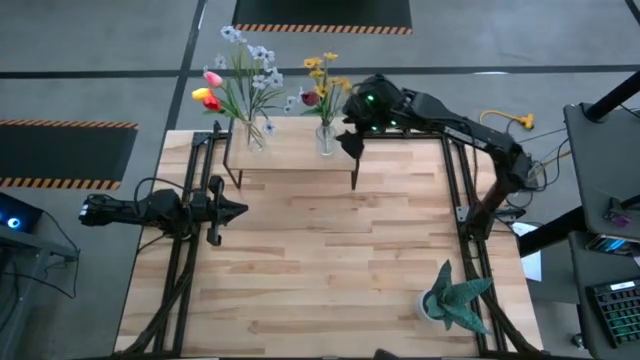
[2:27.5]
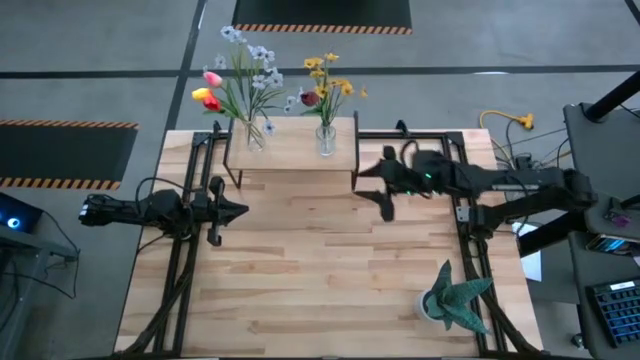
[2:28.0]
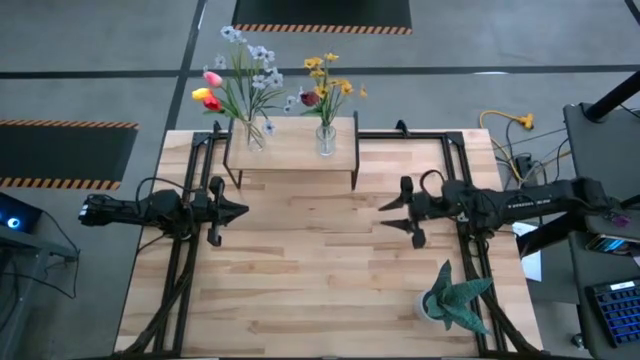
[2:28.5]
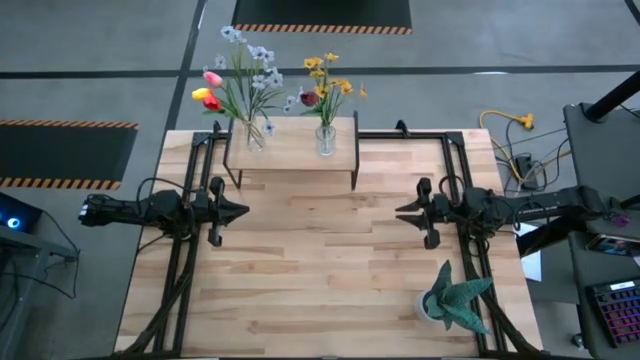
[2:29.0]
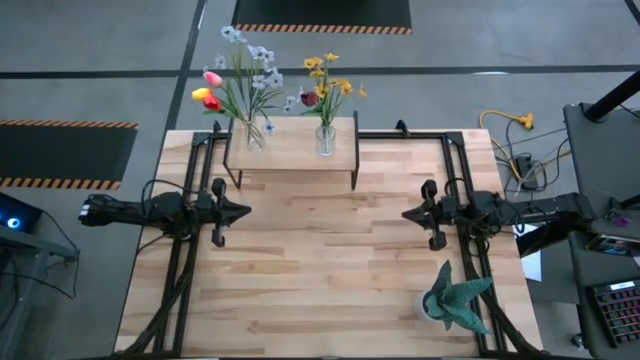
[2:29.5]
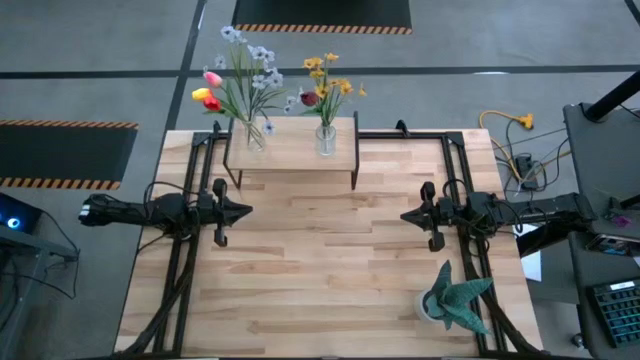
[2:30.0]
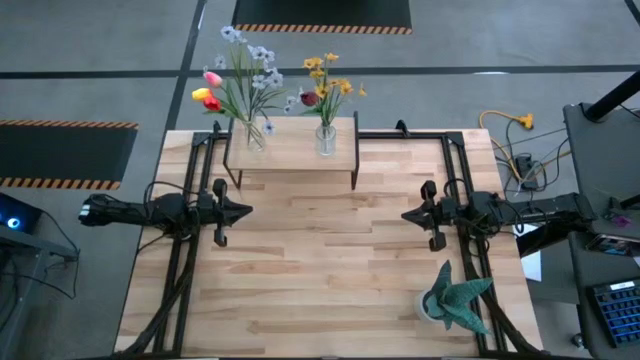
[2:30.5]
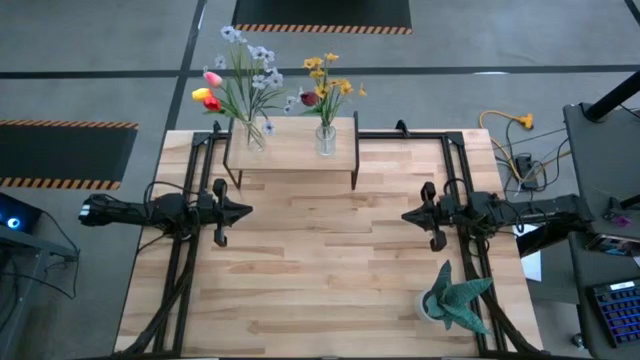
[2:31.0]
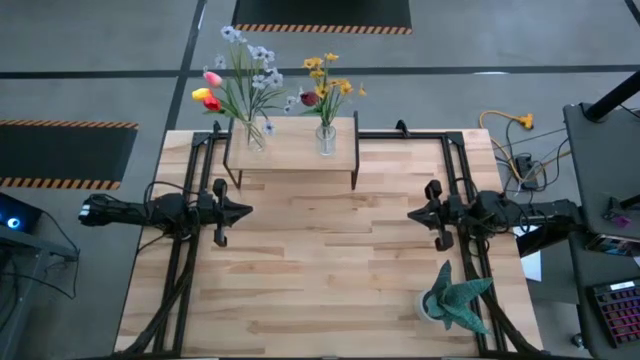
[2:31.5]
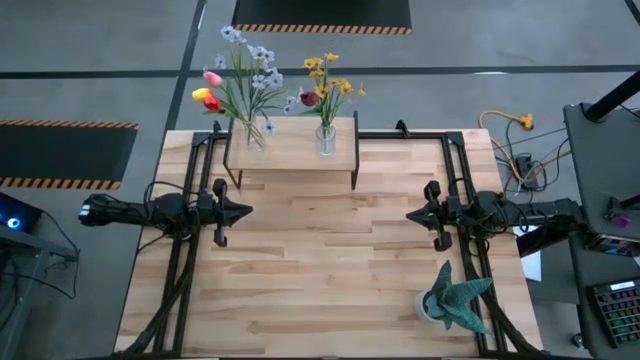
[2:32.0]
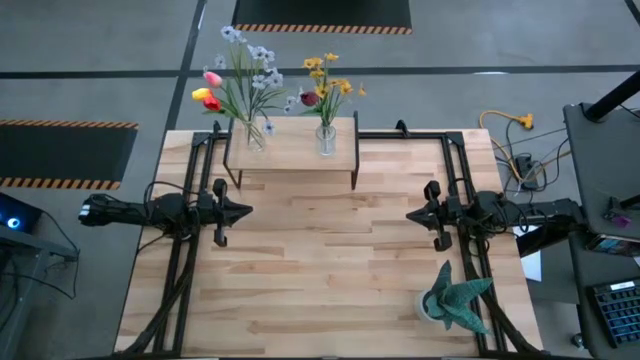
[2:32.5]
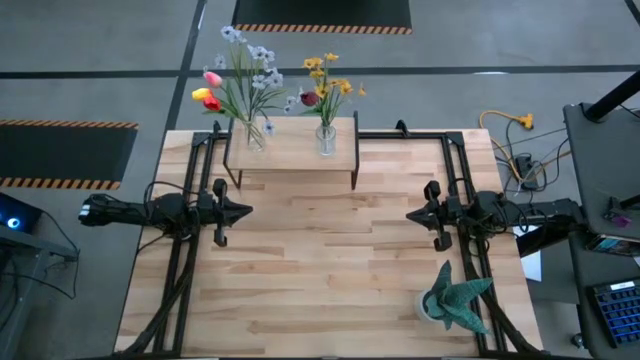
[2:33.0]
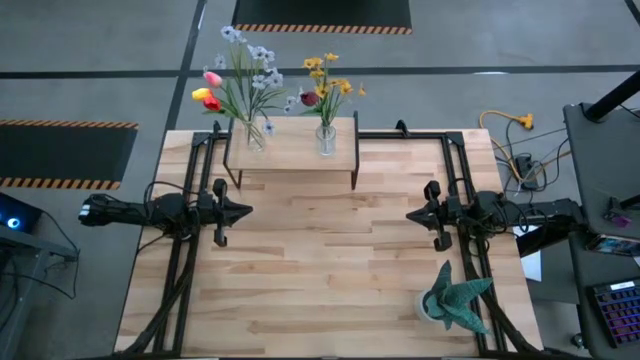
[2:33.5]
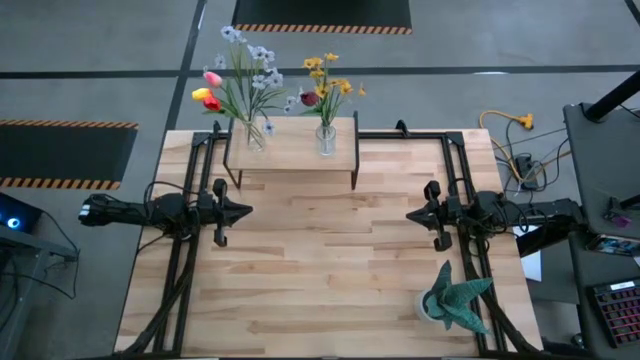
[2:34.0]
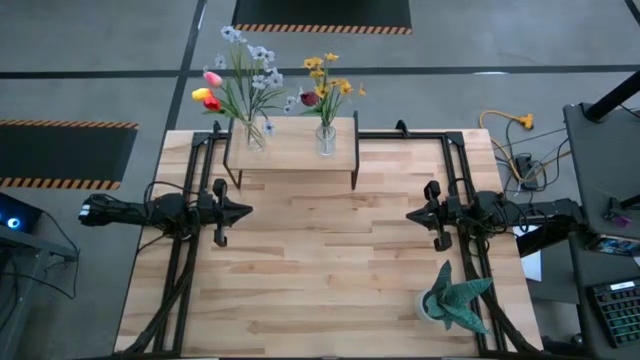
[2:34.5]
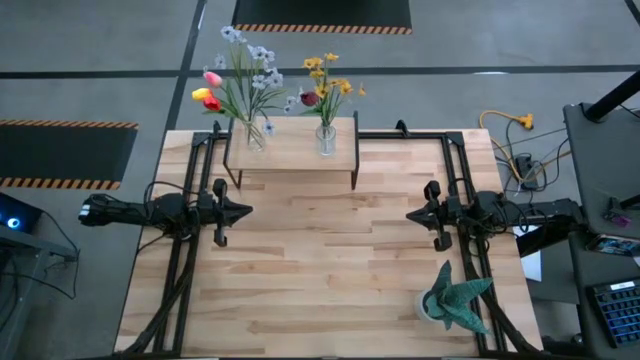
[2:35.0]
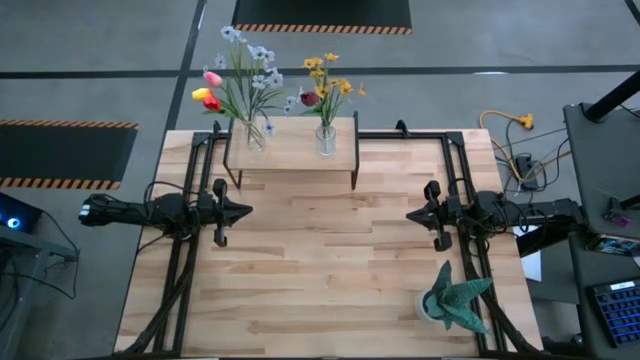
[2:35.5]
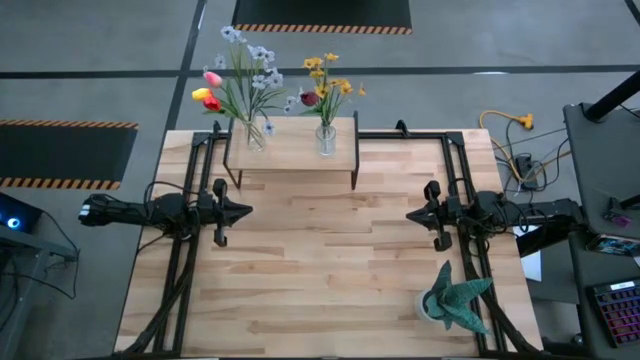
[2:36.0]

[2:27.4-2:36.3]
Task: Pick and place flowers into a vace then onto a shelf
Return to Home Position

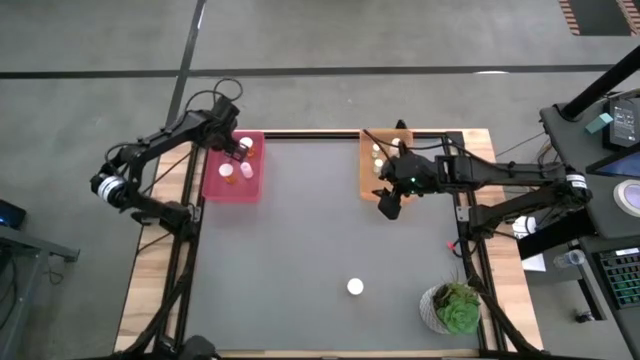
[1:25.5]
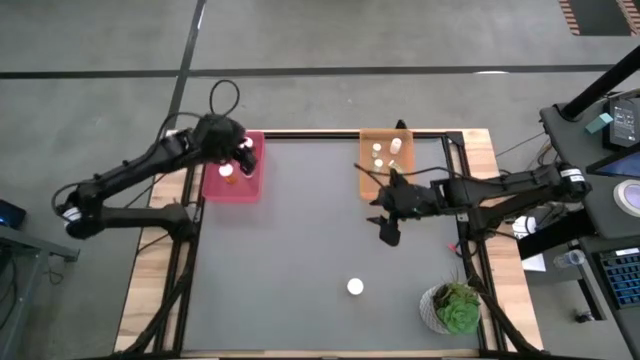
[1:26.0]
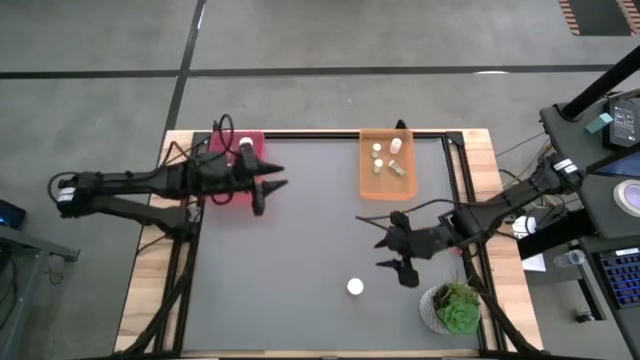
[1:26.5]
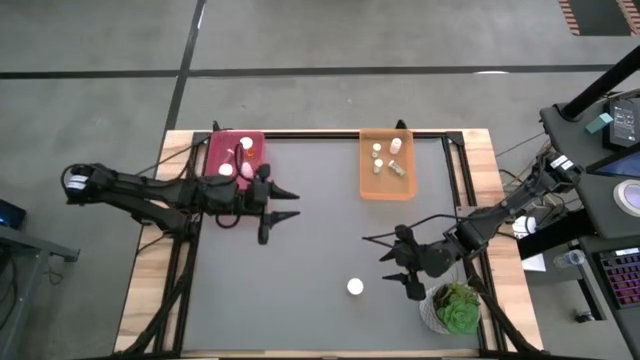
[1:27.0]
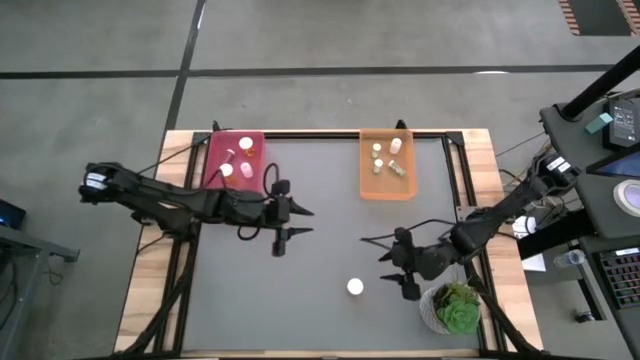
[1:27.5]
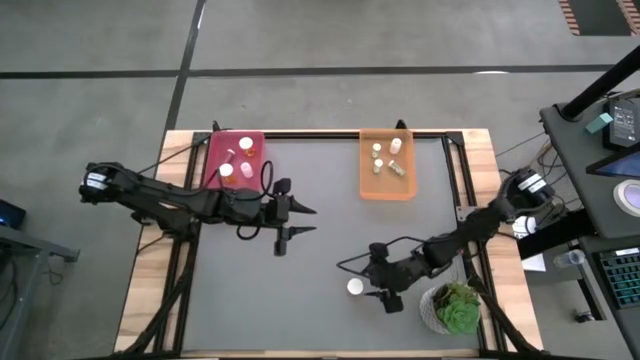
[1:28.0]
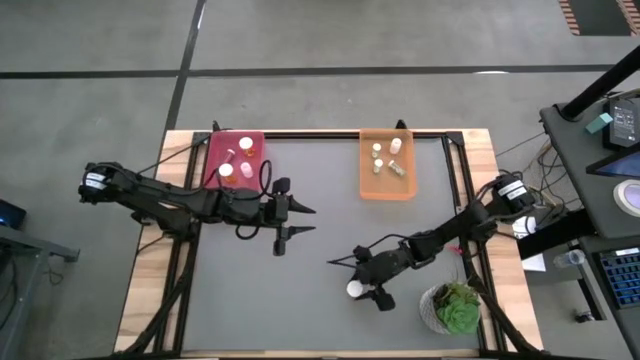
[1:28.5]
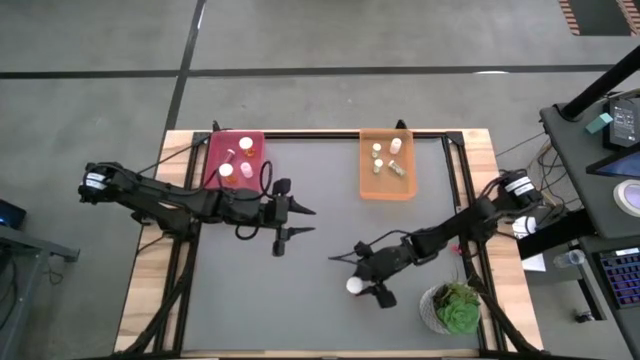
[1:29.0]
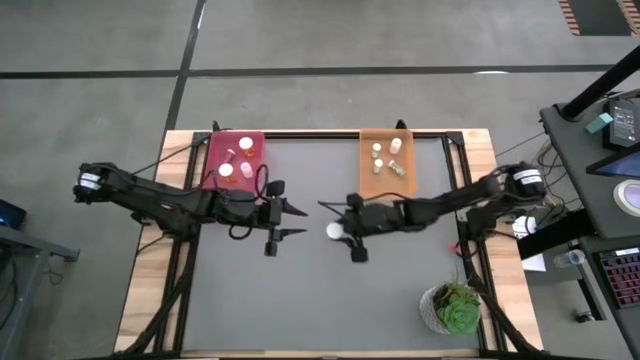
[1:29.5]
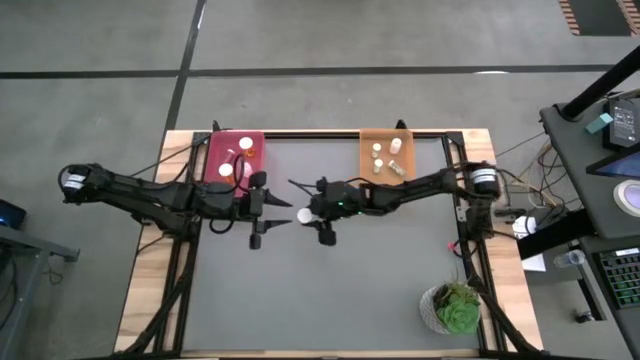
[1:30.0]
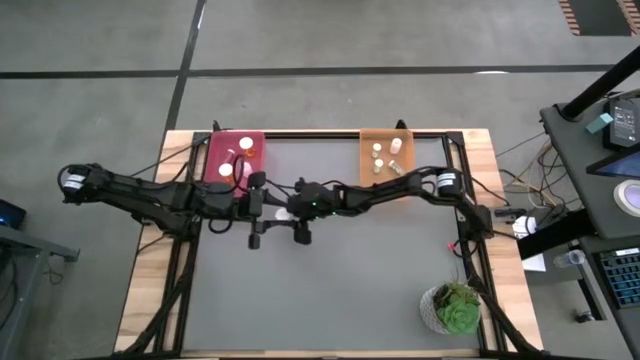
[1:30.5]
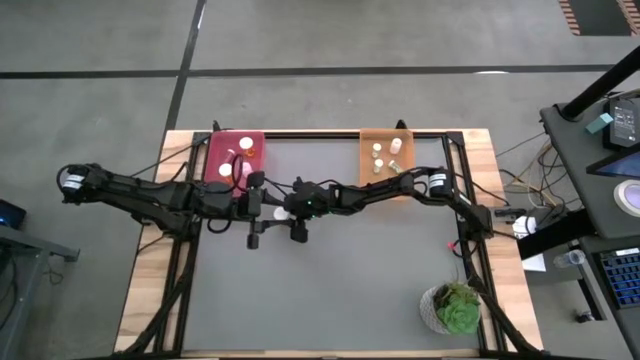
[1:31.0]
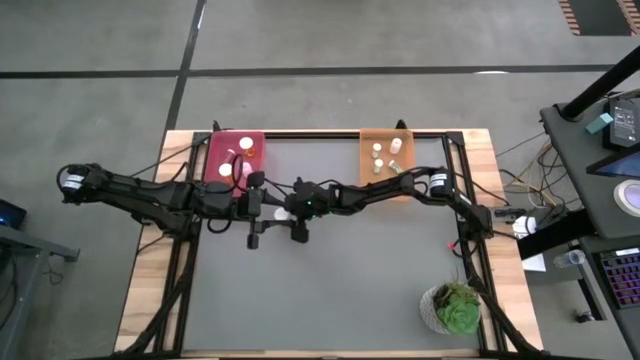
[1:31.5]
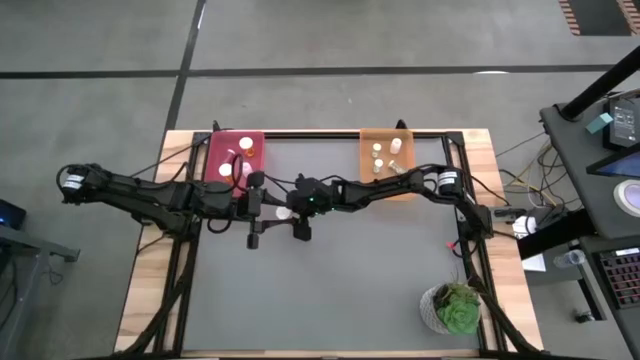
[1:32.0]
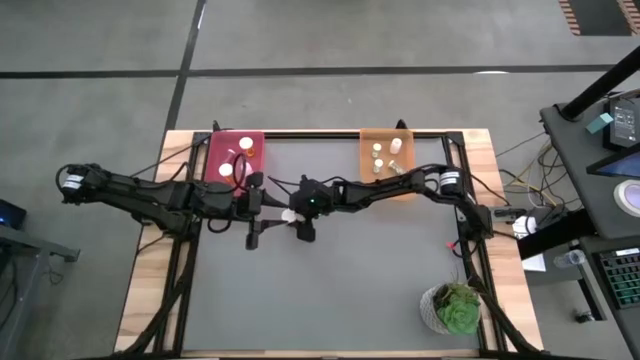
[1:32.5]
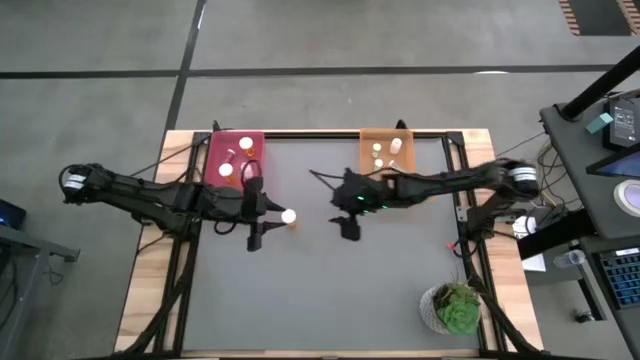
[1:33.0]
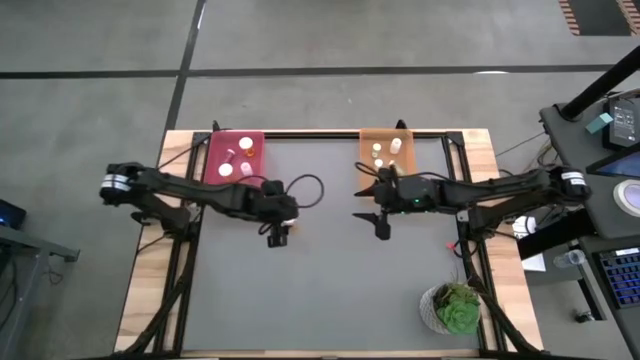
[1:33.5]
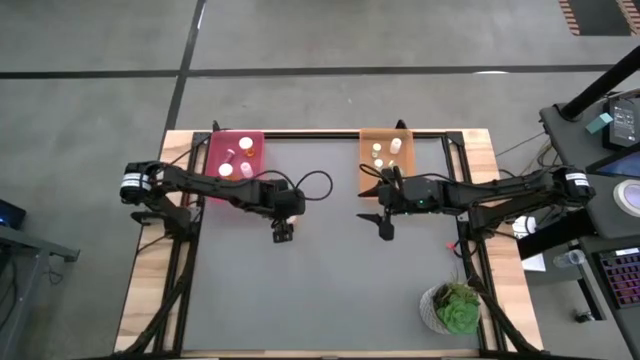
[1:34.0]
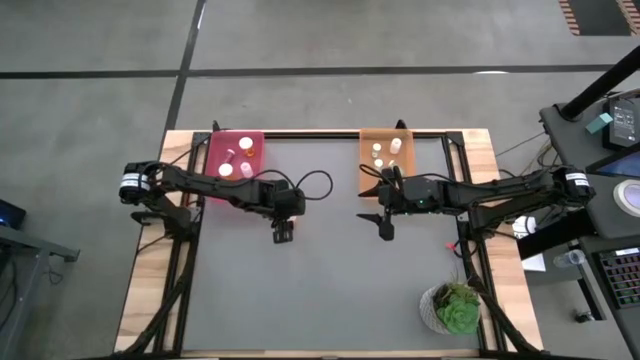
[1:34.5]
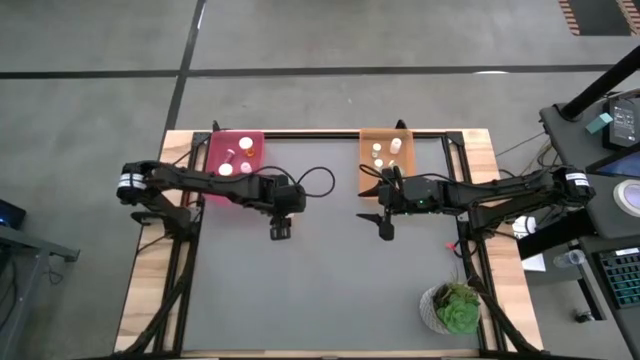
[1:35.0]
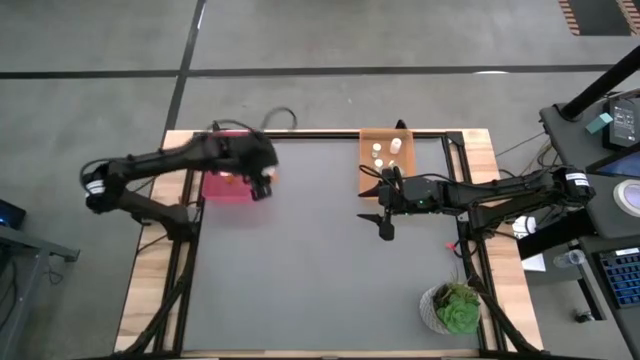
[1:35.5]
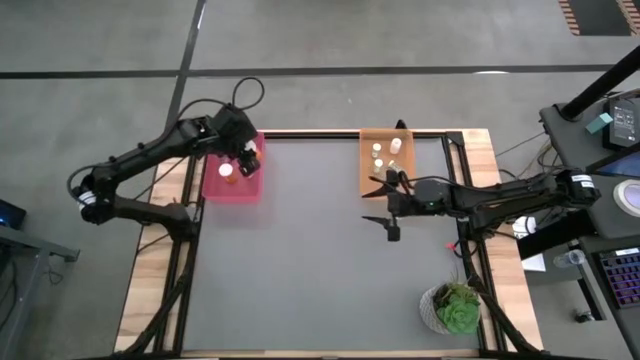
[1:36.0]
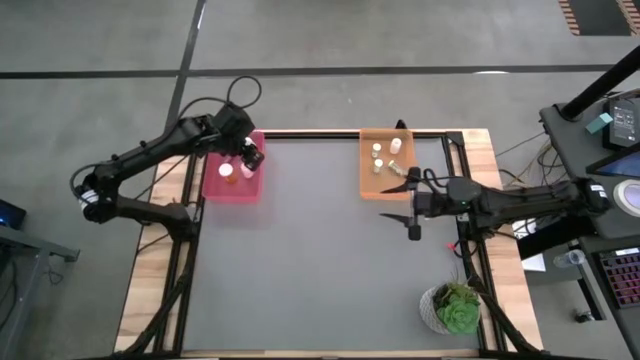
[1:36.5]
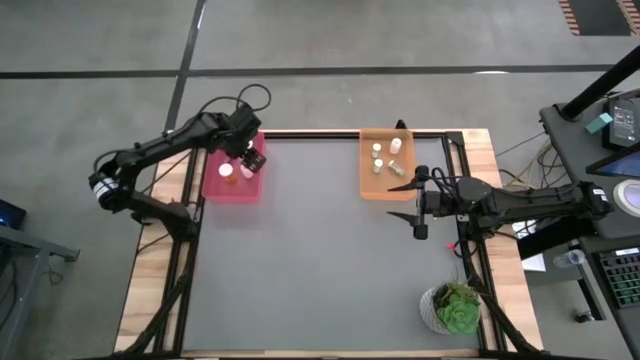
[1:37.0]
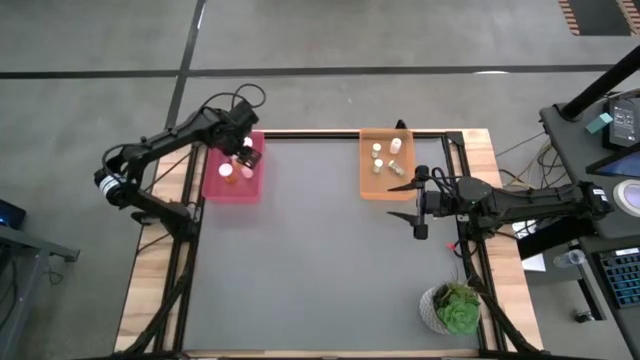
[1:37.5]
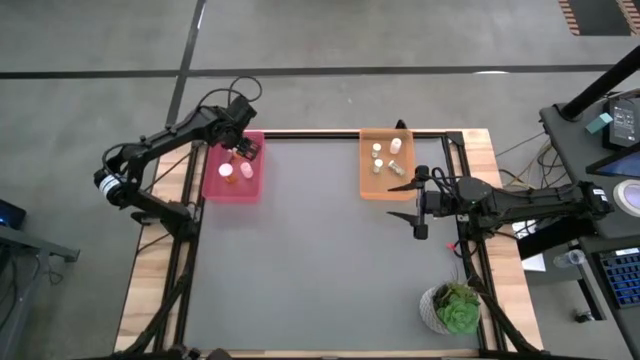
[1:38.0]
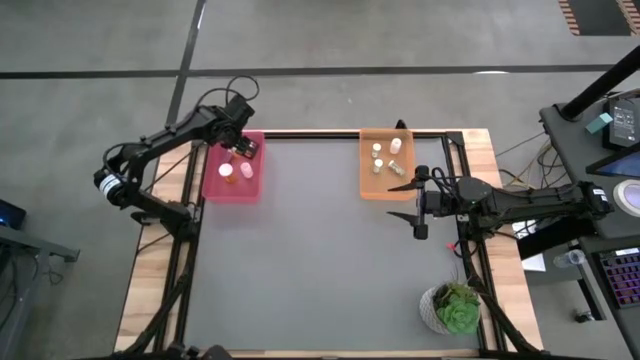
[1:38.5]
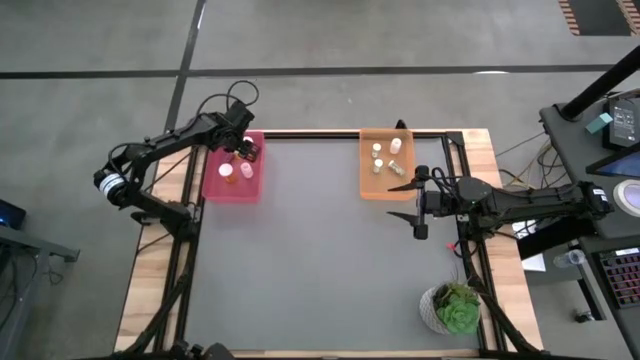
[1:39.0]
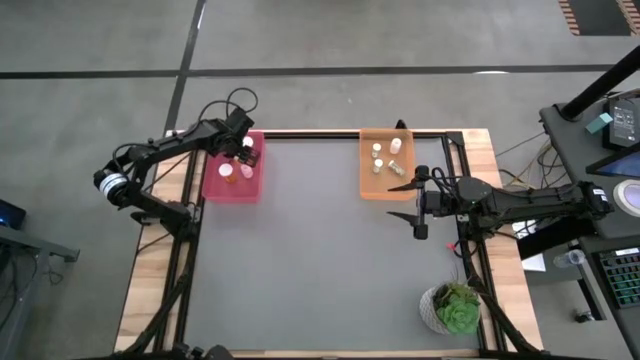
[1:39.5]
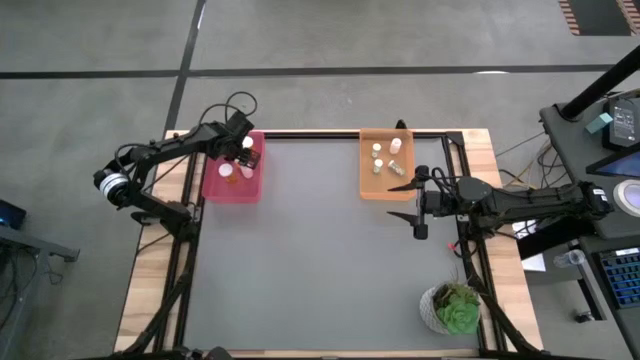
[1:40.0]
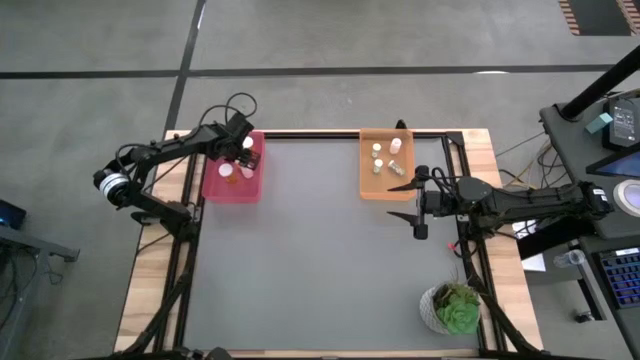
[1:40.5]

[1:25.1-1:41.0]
Task: Pick and place medicine bottles into bin by pill shape (circle, oval)
Put the orange capsule bottle into the pink bin
